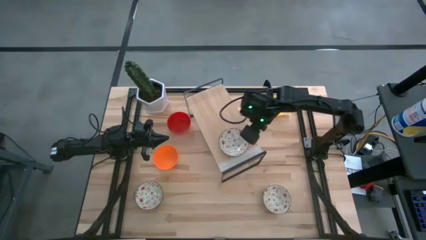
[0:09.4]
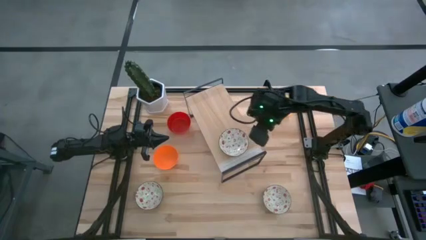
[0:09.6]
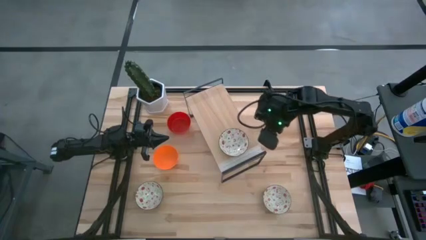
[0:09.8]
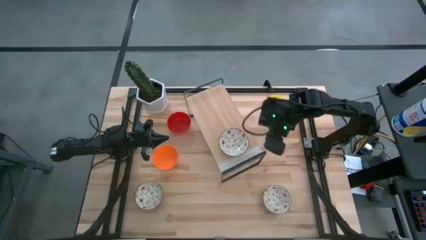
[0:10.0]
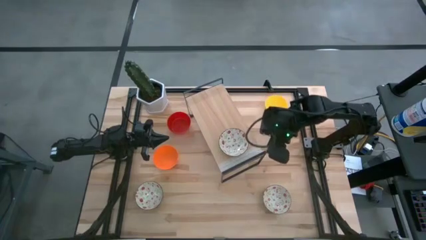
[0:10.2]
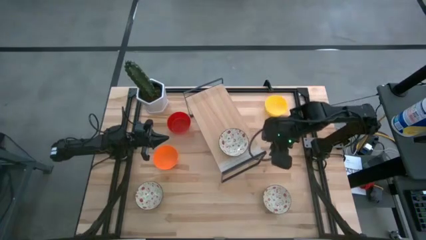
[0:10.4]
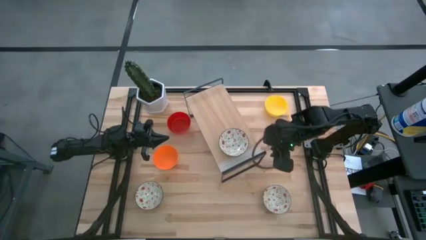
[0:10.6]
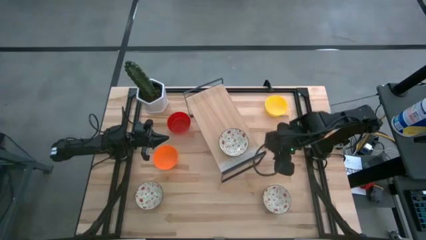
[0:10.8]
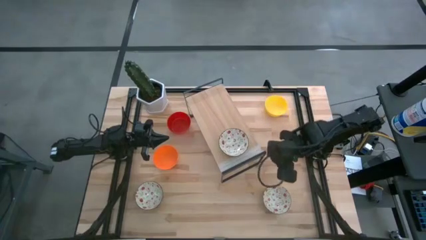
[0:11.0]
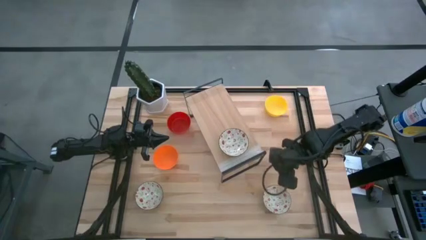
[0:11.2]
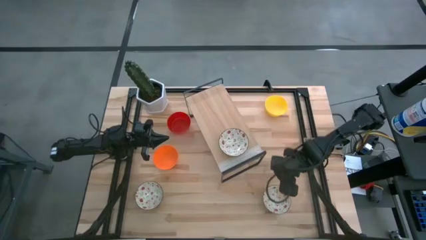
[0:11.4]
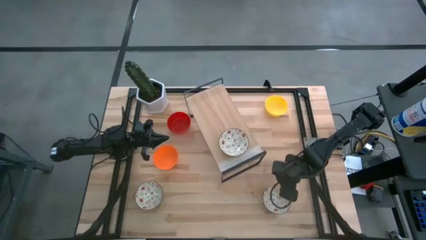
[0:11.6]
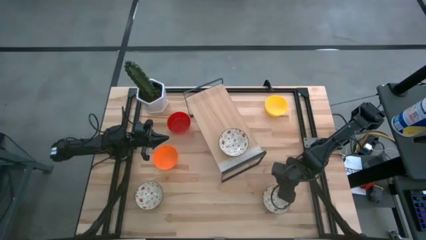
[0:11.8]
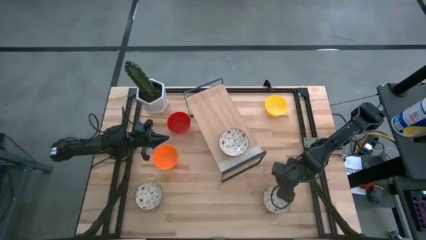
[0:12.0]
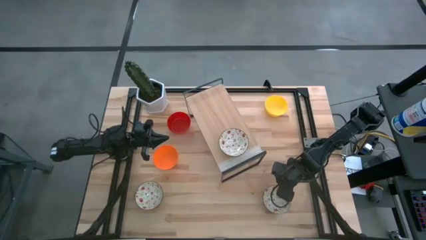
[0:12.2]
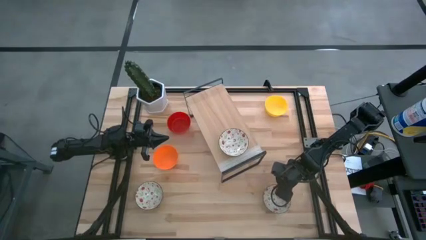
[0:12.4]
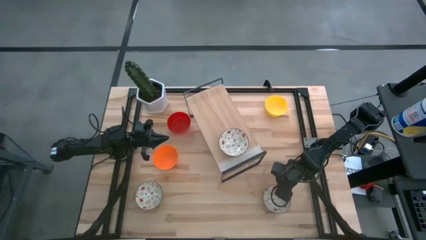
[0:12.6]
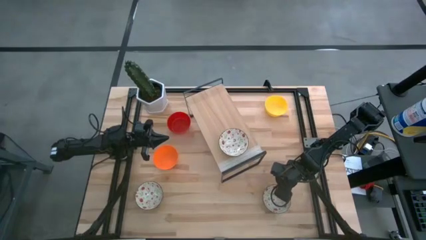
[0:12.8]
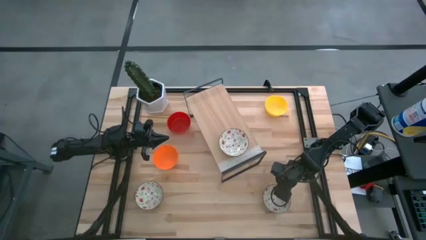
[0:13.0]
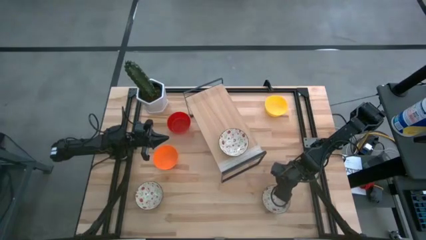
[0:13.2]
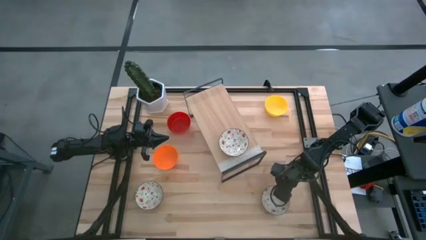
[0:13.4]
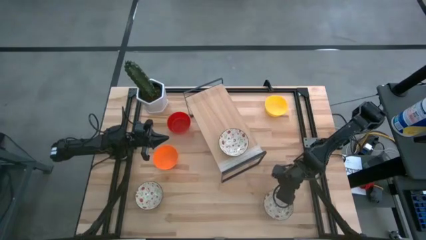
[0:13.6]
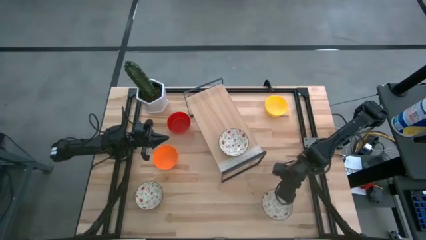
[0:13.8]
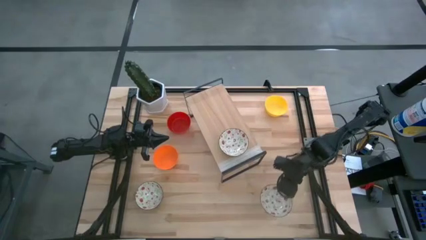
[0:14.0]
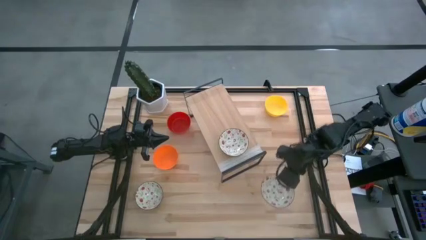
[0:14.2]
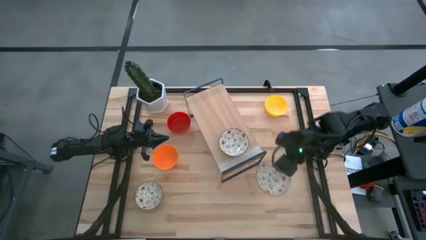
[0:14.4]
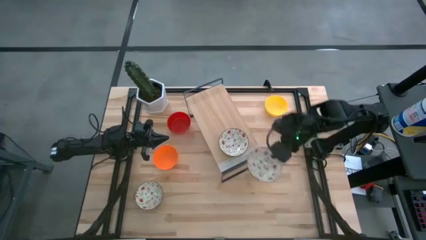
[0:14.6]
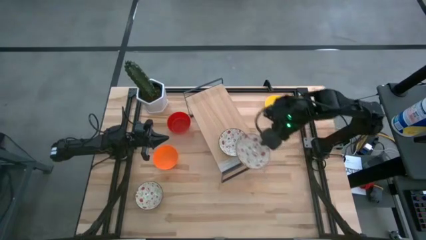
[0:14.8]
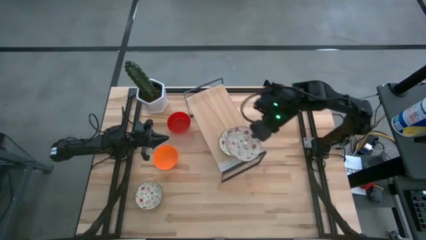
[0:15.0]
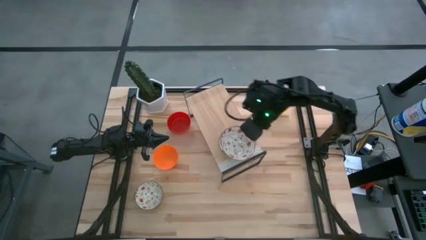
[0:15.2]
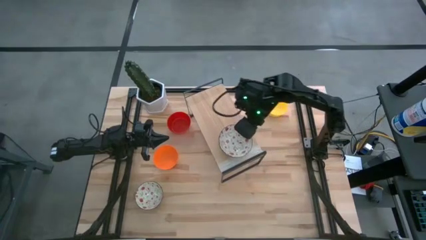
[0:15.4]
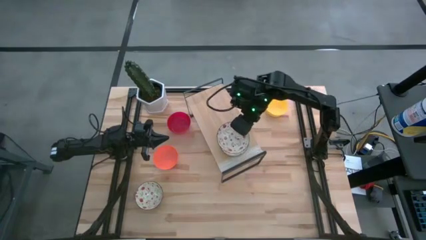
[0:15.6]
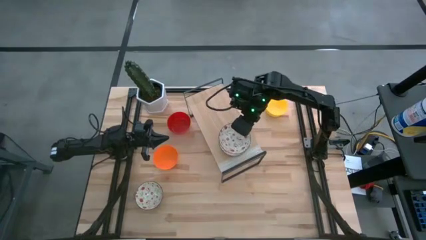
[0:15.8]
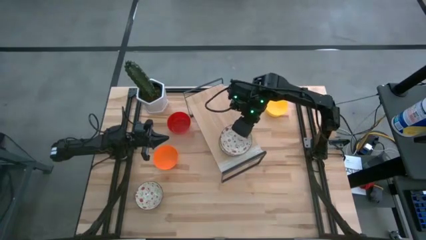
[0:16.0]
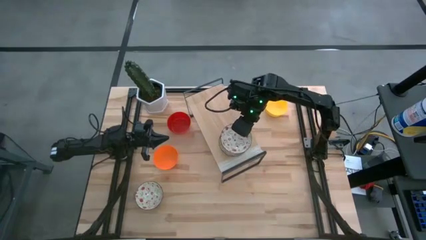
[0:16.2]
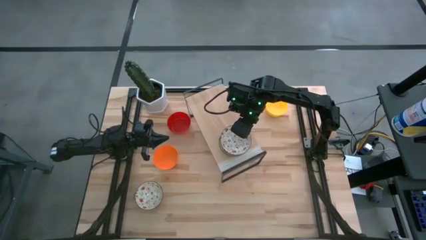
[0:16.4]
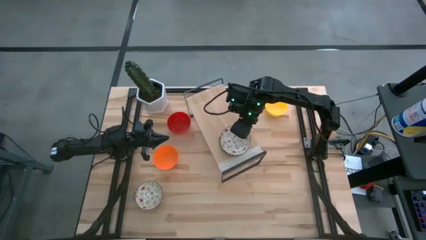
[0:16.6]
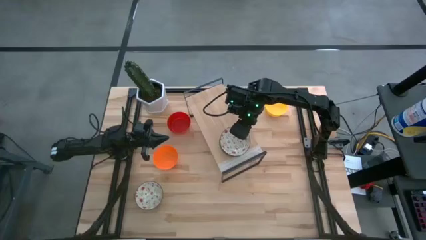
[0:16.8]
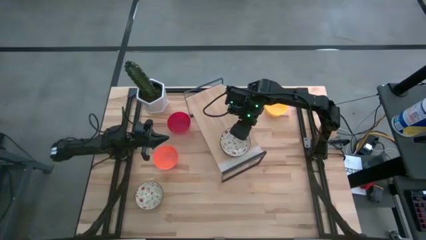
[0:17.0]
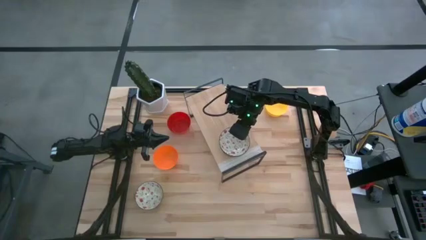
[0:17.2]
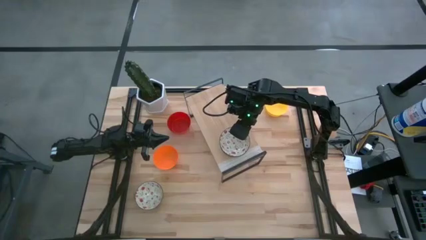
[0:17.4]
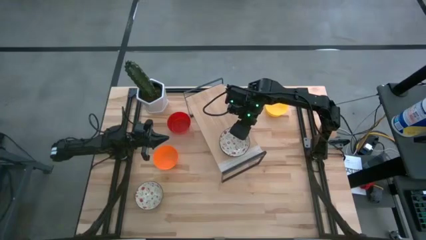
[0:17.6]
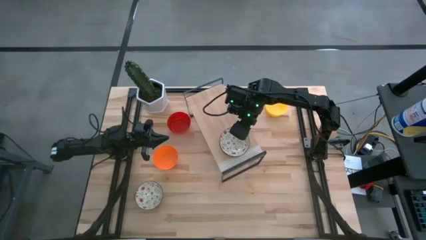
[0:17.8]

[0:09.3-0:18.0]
Task: Pick & Place Mini bowls
Stack the right white patterned bowl on the white patterned bowl on the shelf

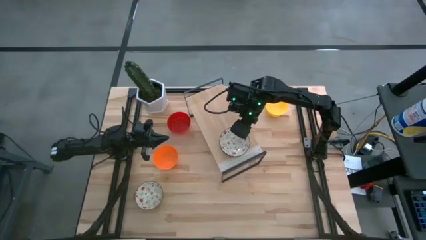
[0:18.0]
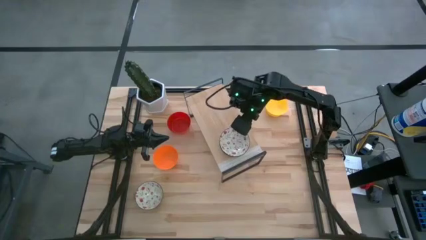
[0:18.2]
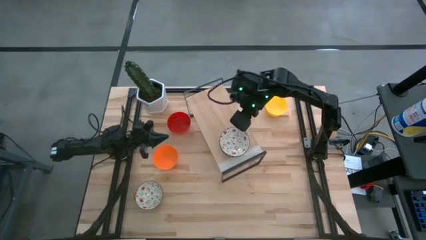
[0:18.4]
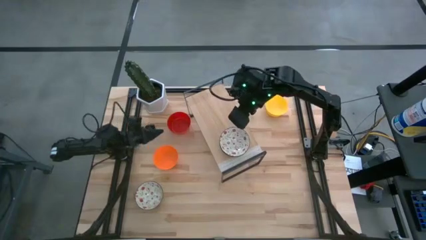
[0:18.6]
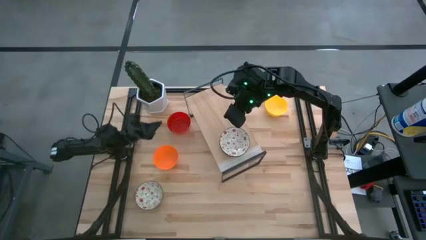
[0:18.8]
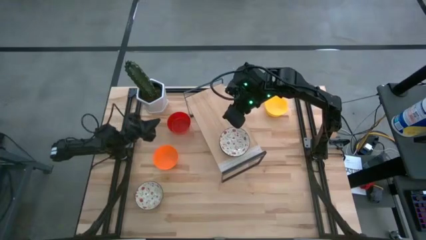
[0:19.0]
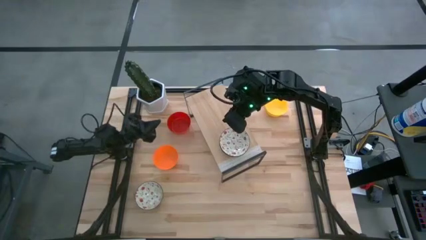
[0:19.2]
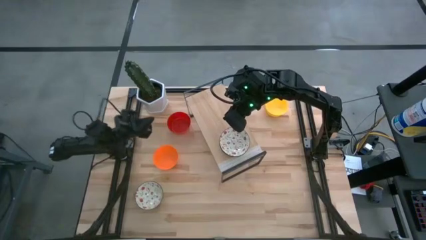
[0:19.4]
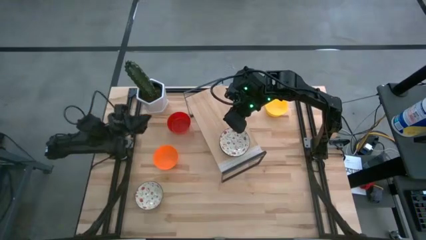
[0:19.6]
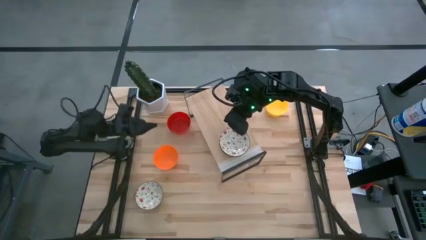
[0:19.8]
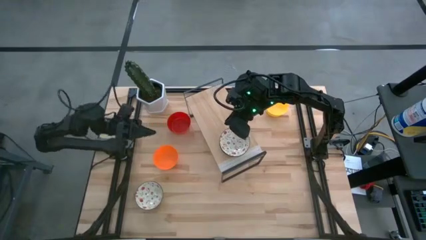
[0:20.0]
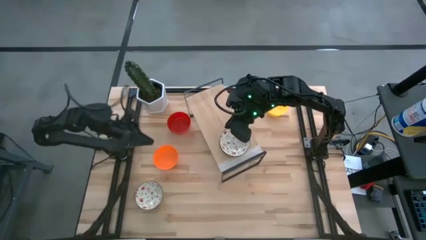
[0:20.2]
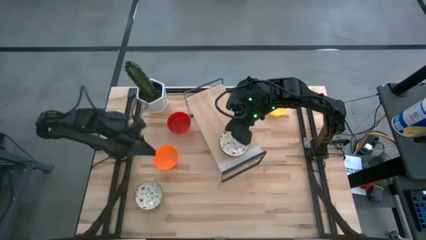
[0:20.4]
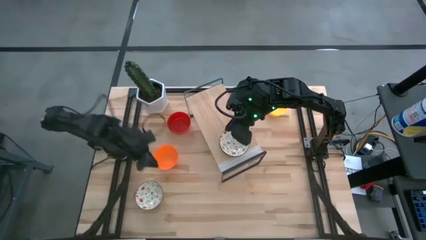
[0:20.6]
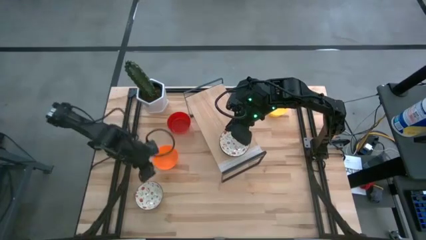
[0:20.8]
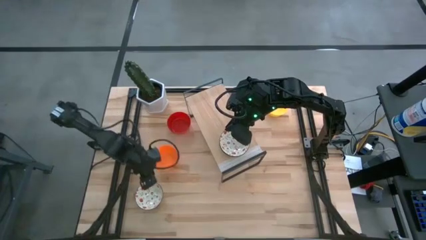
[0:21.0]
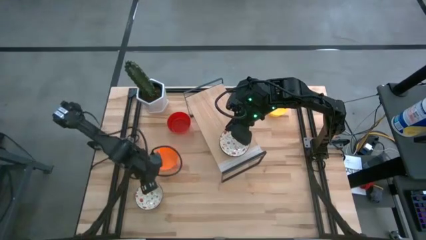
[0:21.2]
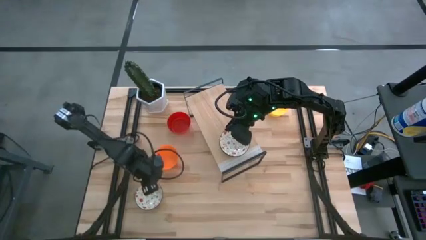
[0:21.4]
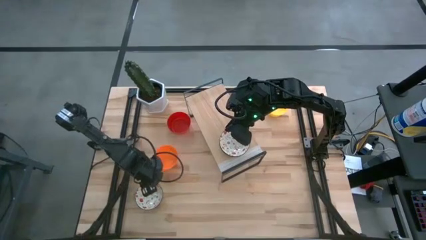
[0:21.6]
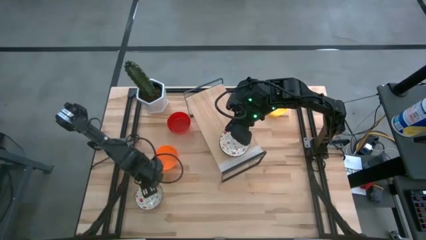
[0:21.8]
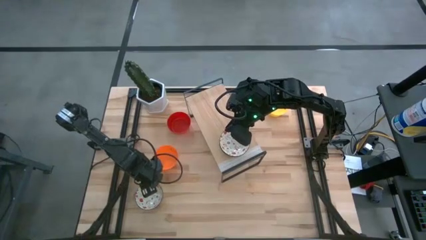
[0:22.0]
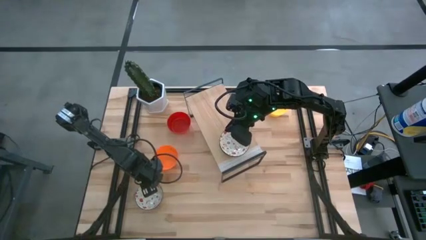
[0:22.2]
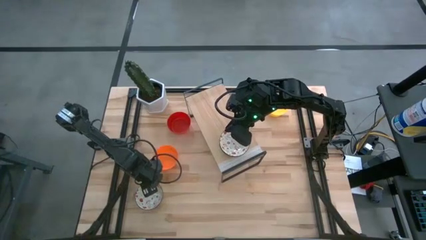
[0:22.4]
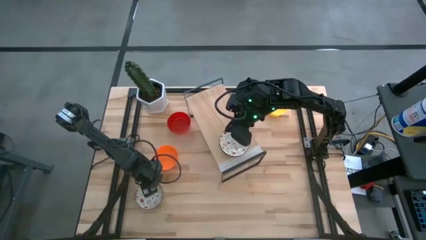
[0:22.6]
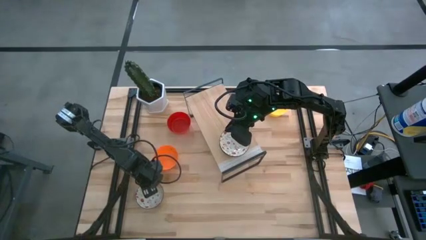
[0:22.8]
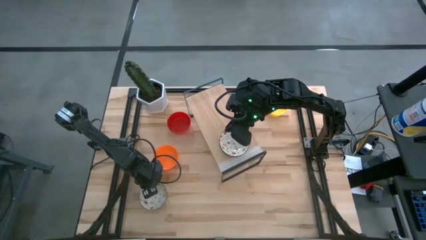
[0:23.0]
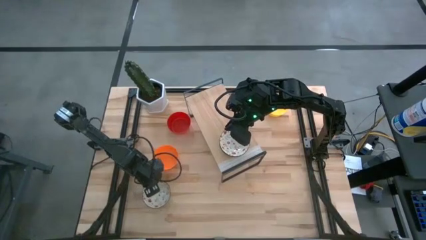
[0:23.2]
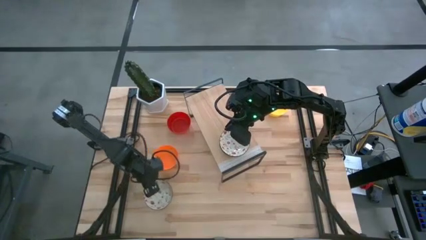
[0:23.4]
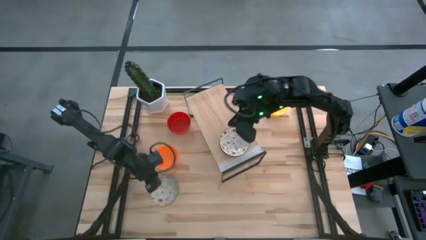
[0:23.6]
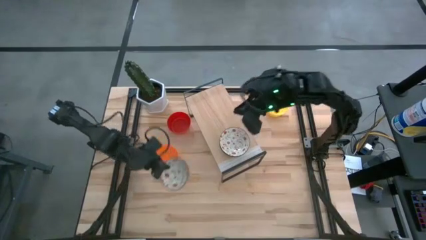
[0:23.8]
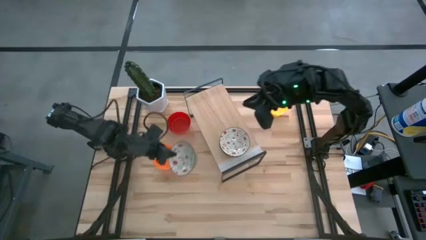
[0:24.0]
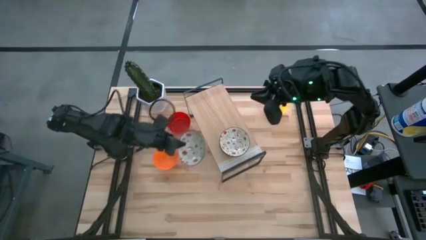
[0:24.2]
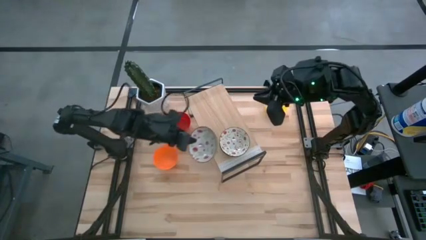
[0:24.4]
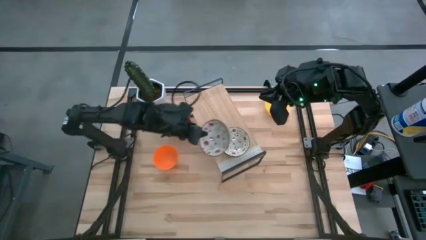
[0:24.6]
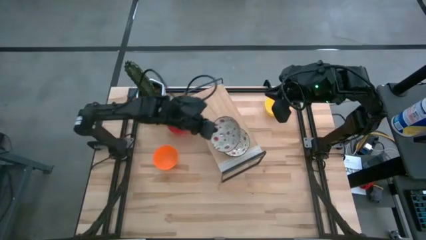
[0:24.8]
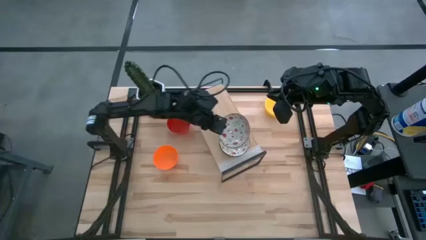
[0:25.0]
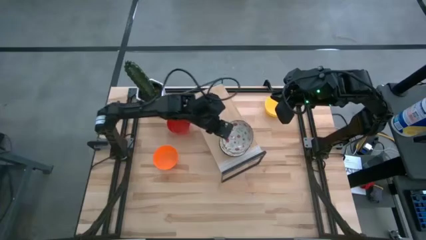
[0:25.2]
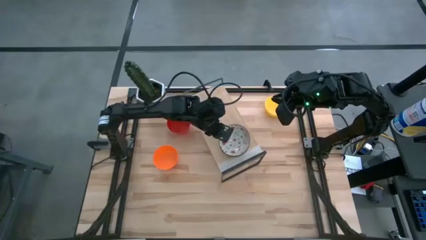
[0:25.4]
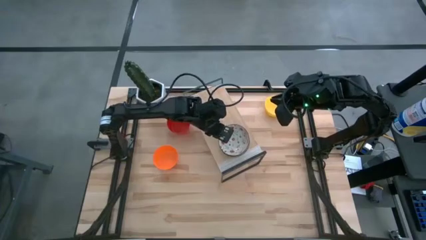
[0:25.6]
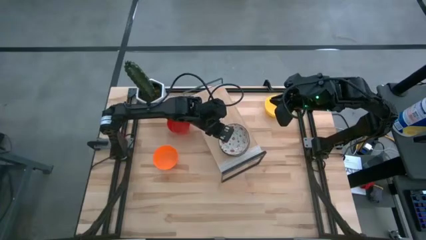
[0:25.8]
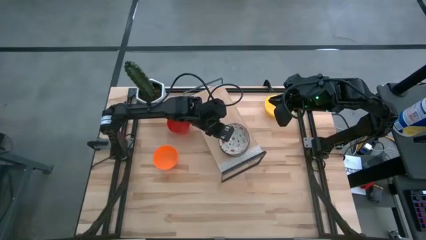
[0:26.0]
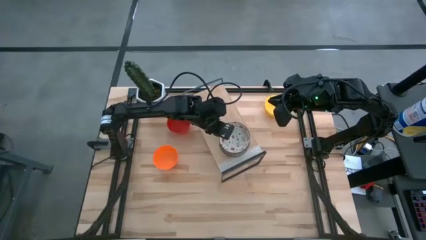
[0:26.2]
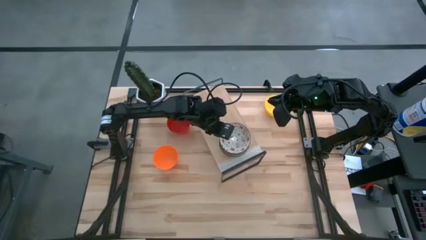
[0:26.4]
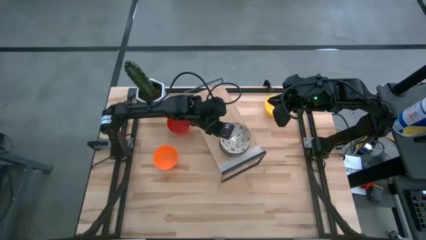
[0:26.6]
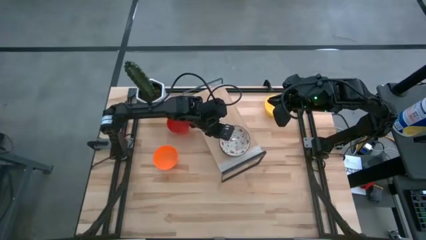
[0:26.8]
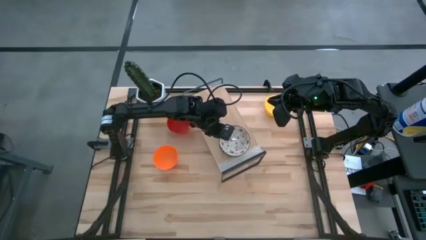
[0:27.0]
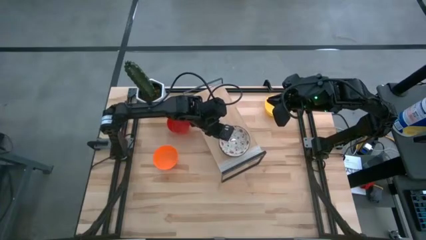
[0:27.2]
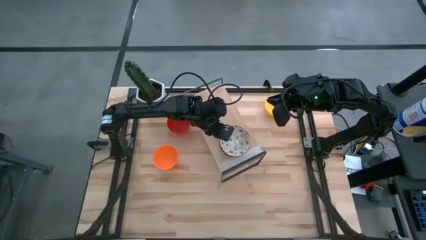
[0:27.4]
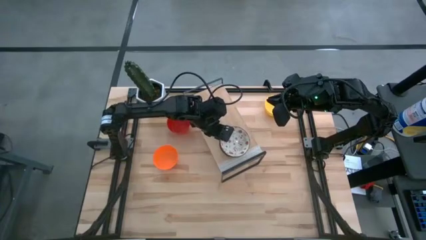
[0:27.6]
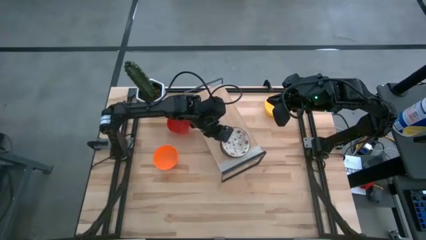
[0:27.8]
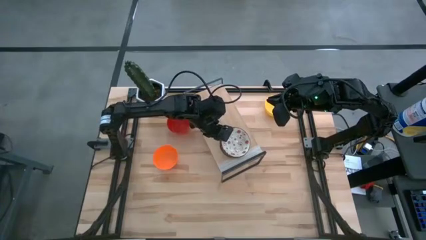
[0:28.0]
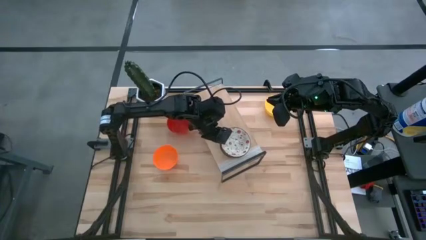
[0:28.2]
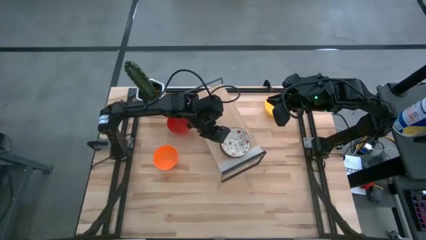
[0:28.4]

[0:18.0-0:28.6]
Stack the white patterned bowl on the white patterned bowl on the shelf
